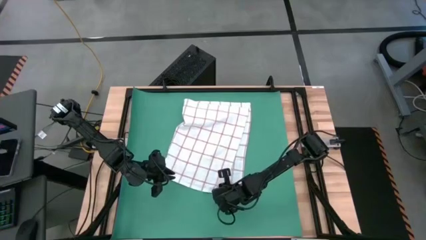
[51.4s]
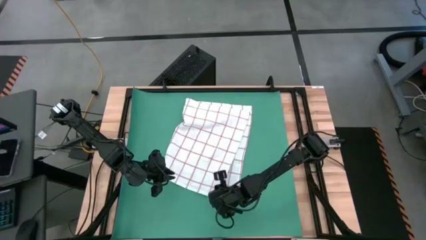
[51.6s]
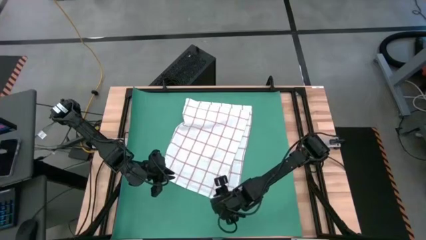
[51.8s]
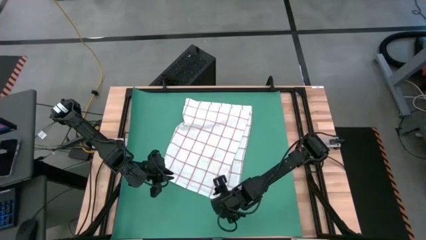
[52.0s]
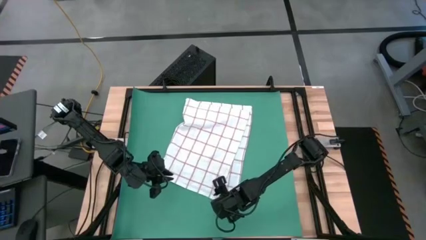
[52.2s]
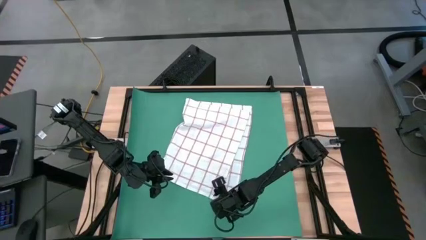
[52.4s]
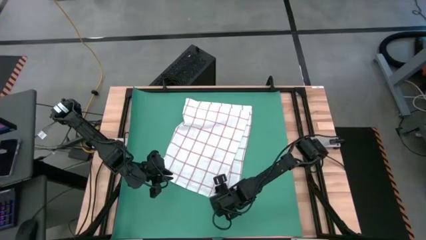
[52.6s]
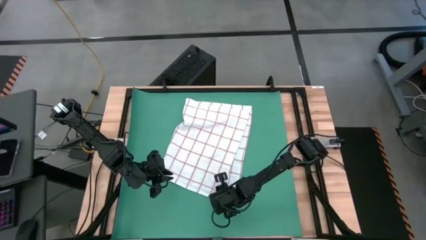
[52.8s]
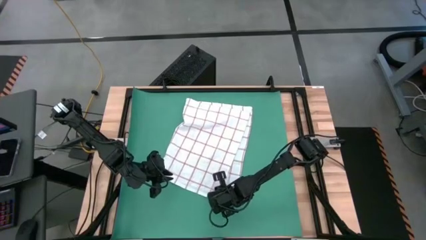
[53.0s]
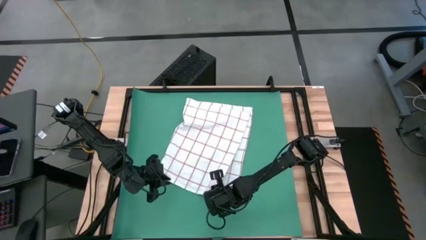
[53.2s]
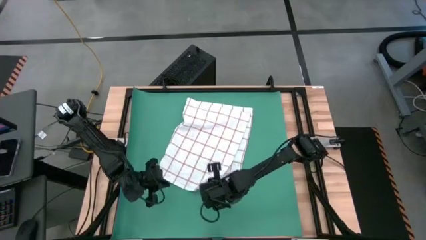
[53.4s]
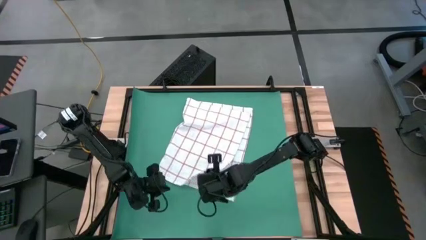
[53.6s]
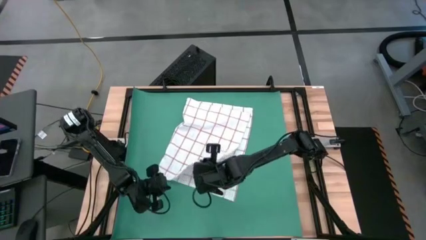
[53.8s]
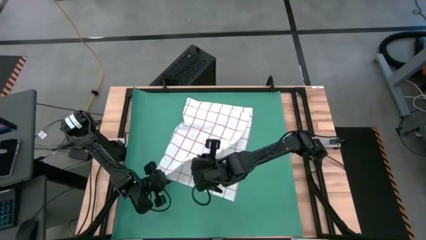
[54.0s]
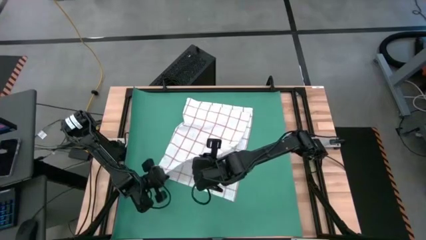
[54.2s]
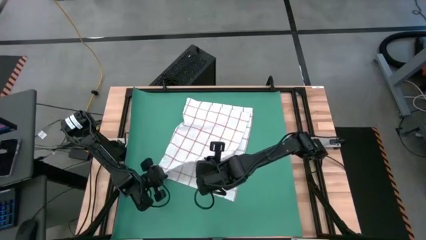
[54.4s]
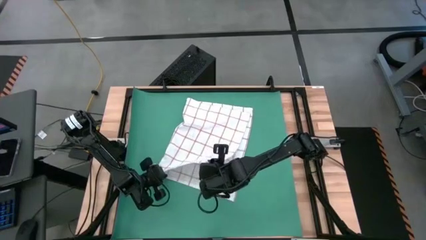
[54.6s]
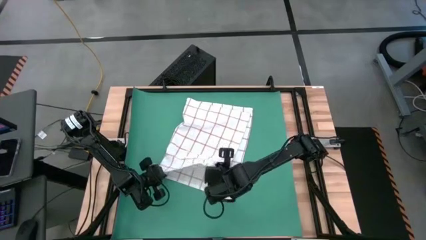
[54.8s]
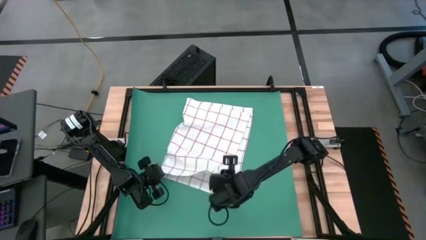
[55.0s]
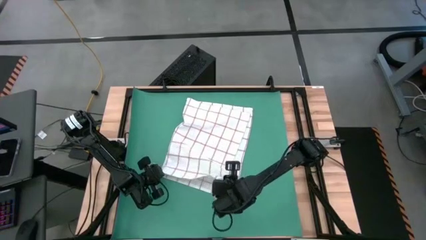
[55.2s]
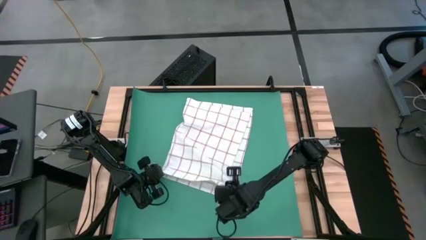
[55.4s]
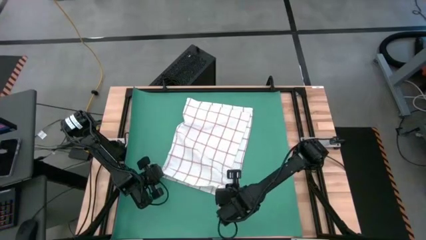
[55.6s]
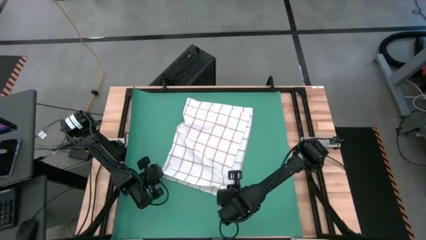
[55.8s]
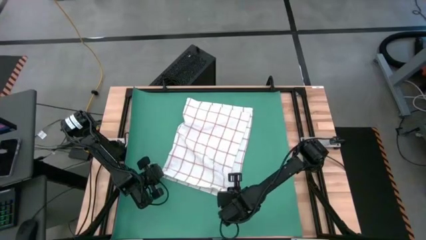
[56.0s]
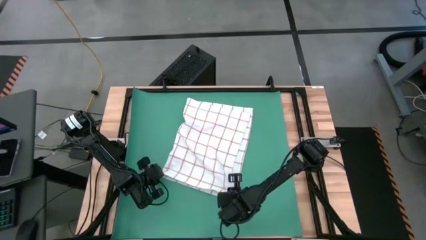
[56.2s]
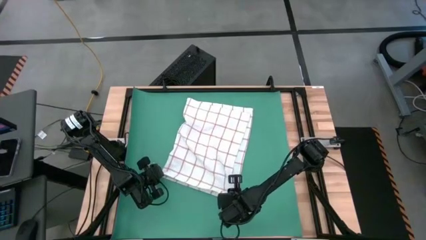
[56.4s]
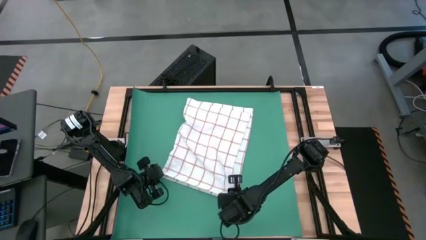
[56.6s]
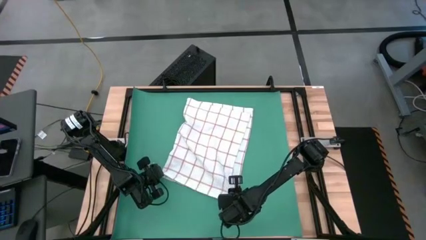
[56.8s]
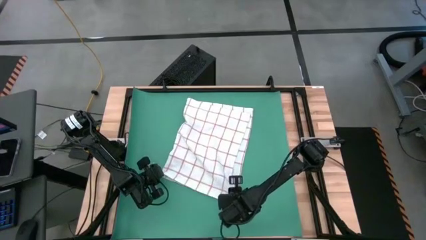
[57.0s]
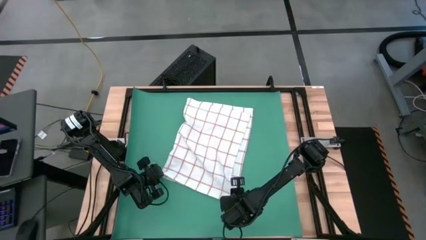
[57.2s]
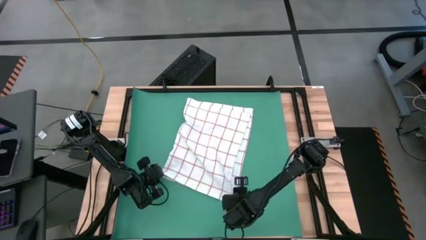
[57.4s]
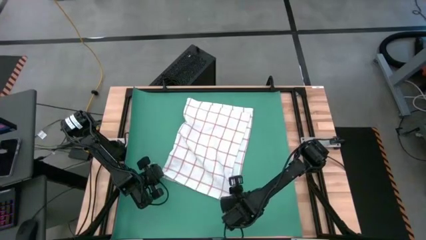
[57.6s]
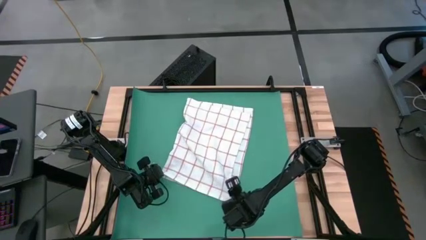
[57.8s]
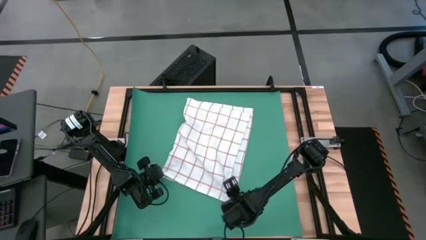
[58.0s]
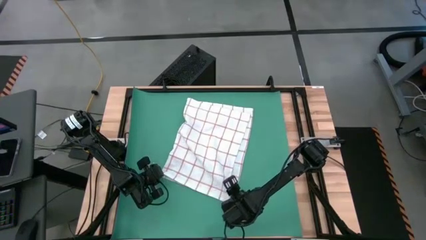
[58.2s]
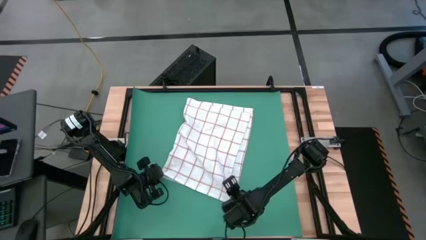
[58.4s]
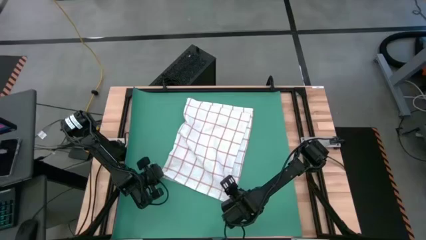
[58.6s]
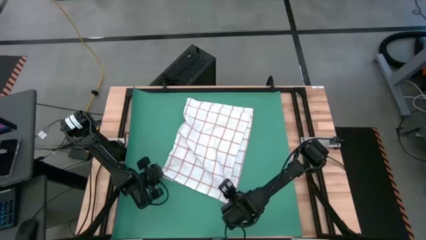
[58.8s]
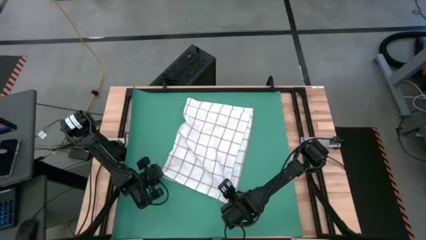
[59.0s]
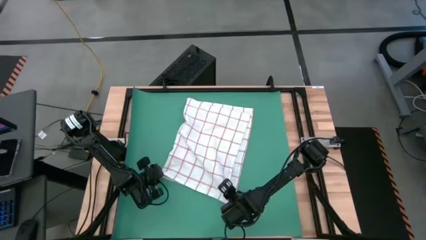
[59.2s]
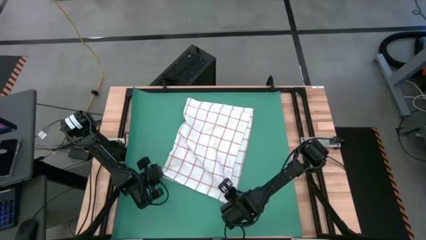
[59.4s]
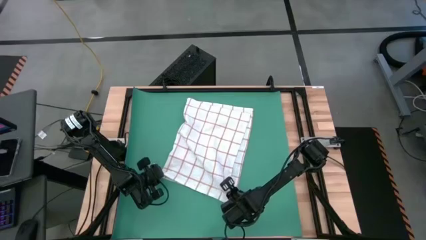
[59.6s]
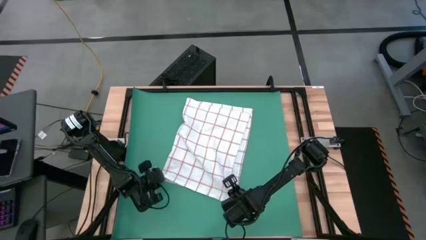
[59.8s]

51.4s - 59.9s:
Task: Roll towel
Roll the white stripe towel

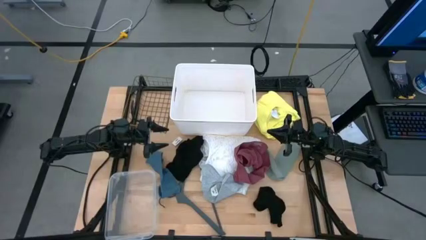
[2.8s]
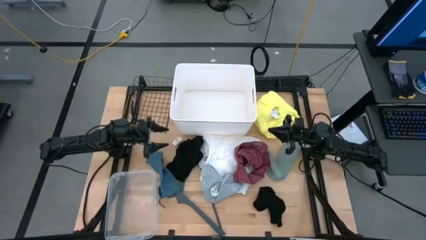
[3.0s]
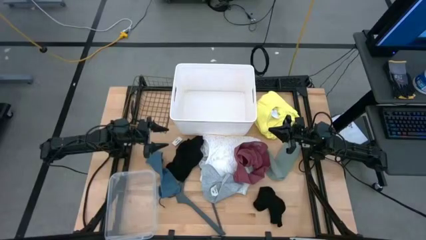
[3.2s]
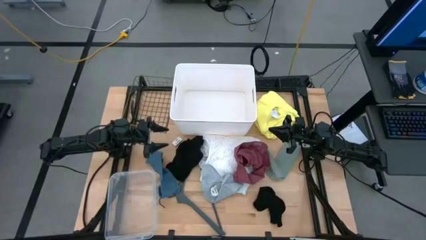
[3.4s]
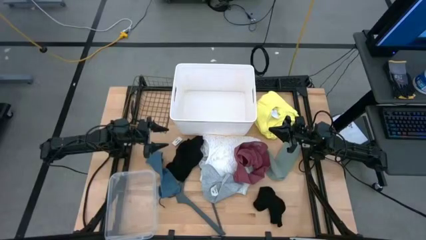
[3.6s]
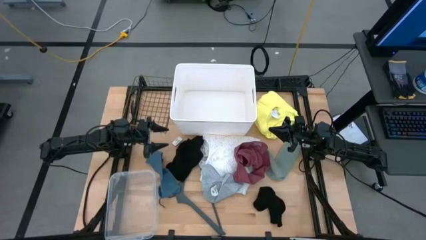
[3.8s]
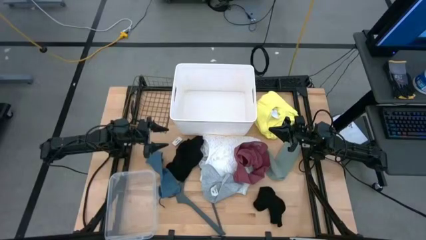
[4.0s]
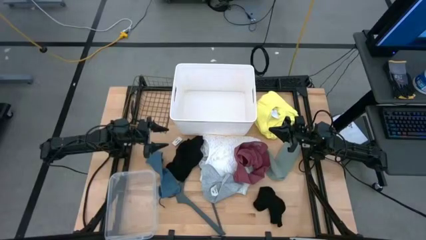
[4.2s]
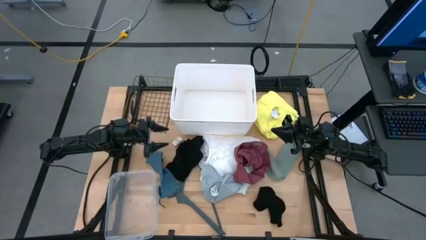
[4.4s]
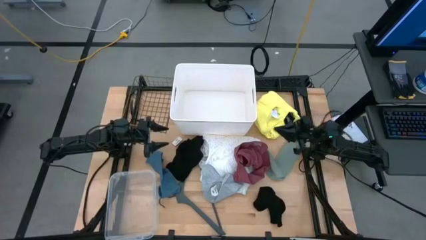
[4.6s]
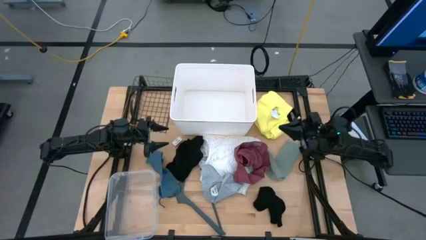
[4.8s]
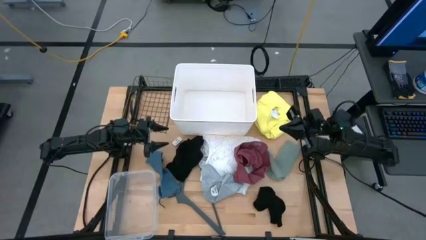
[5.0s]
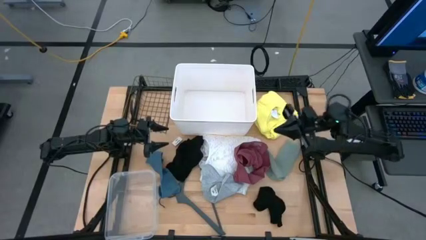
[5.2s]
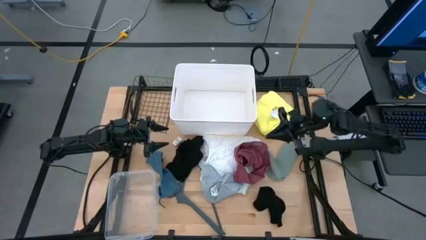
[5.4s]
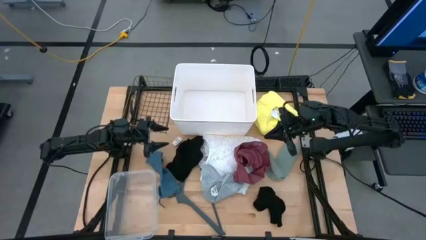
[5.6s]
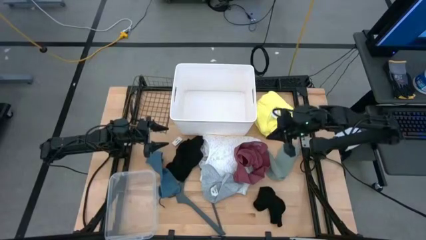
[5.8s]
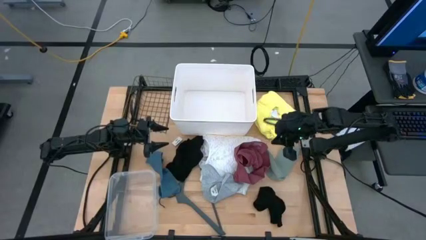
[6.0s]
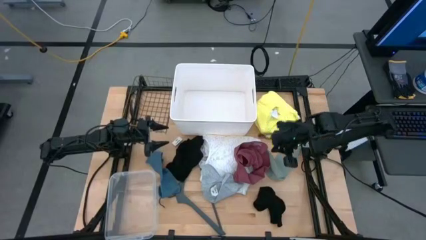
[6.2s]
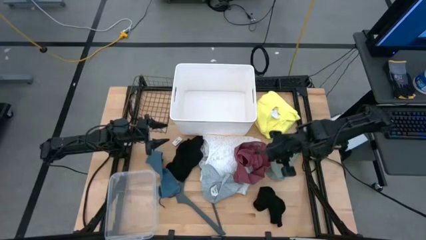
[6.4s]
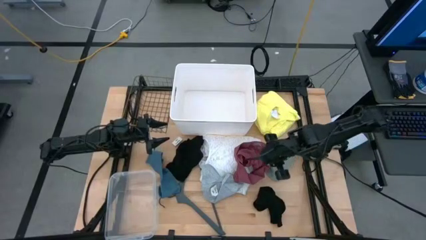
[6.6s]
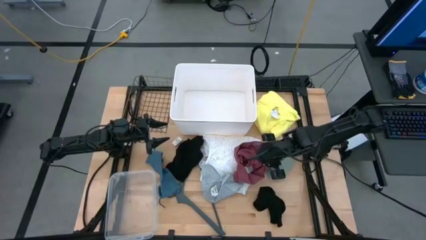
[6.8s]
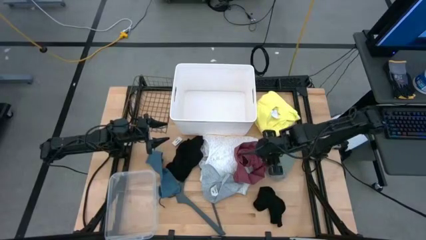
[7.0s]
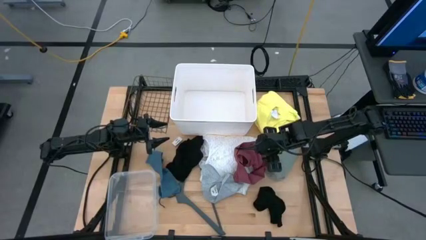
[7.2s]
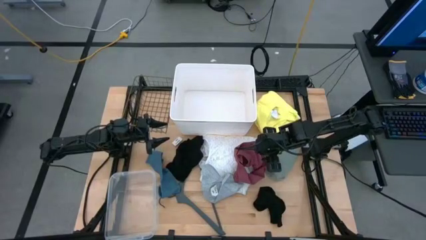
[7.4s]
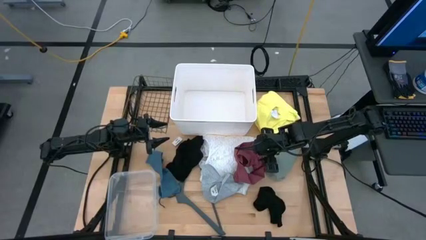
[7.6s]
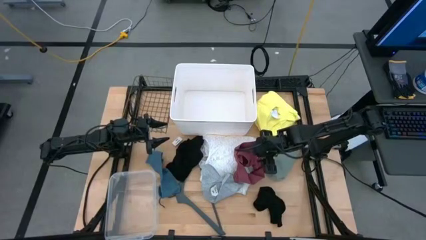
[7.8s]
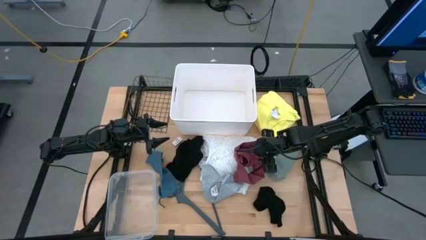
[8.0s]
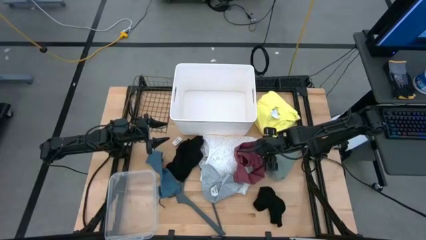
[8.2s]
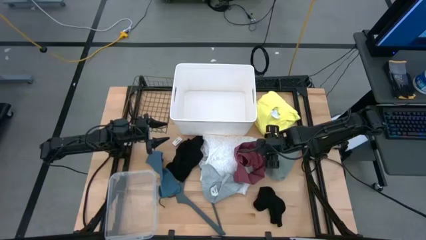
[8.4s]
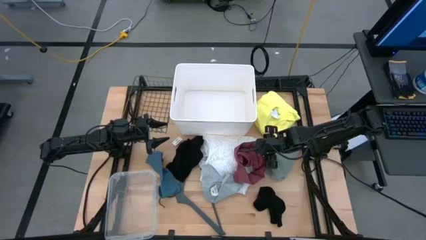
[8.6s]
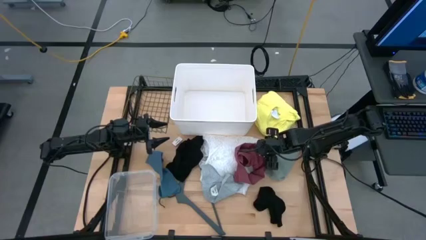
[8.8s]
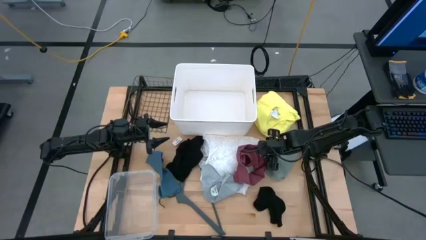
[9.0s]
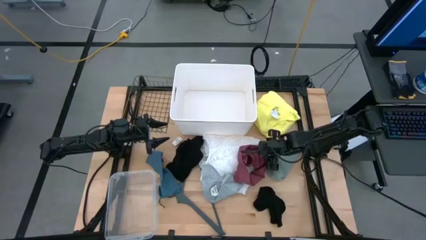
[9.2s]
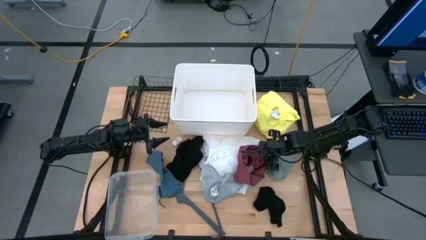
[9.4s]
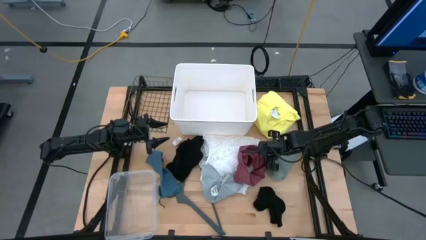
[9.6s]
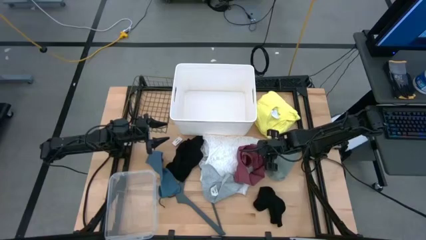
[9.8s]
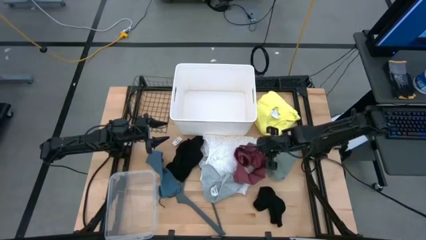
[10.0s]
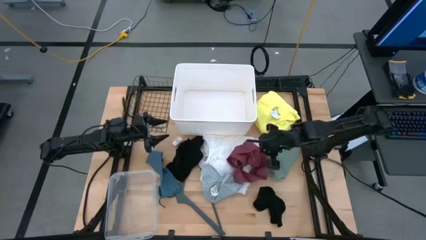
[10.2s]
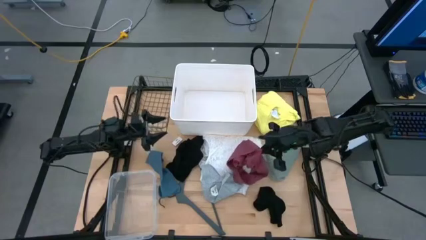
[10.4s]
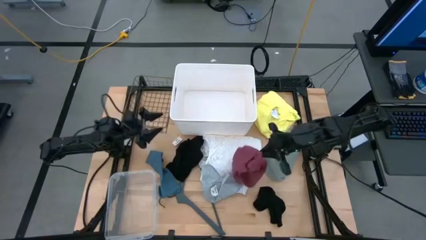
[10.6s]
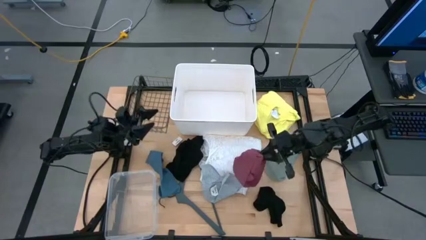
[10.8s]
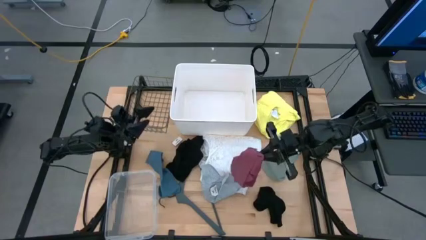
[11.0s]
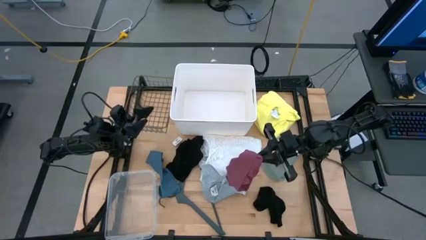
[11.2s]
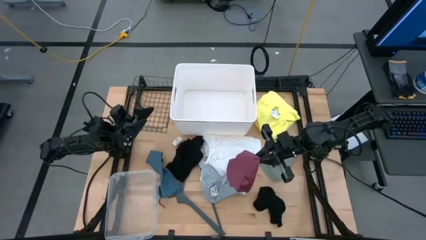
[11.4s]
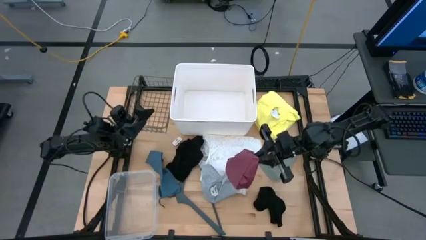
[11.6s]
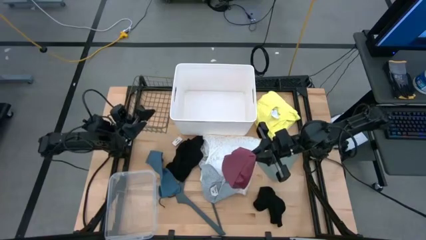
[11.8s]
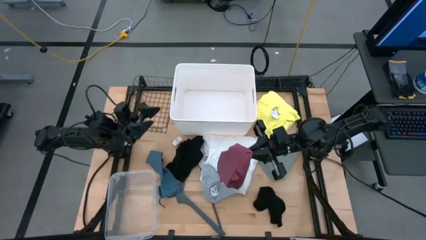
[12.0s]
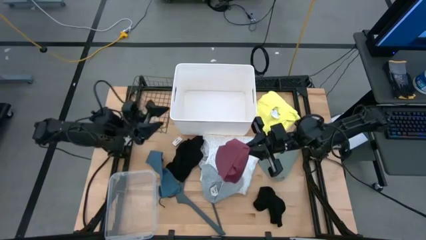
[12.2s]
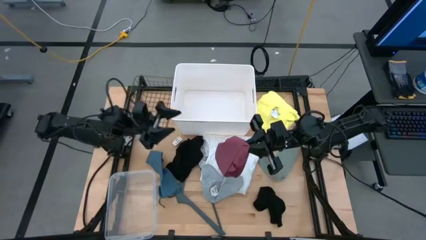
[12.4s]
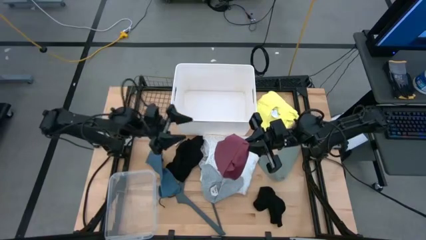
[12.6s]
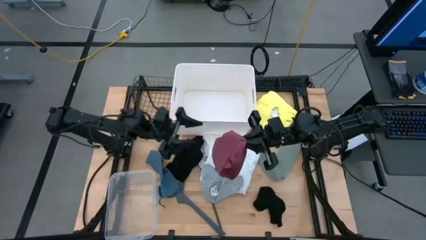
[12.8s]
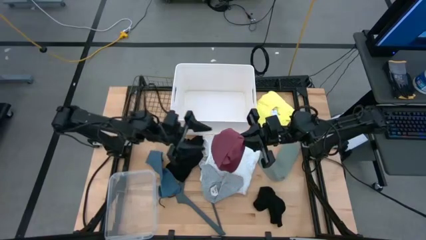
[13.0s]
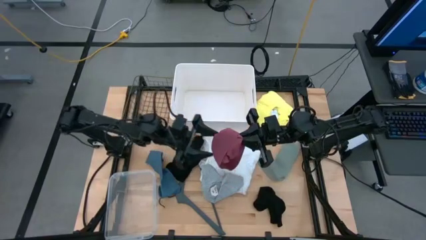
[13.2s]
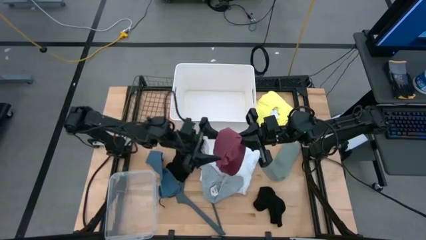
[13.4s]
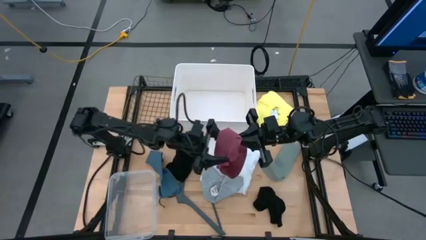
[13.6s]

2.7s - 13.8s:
Task: Pick & Place Cloths
Put the red underwear into the brown basket
